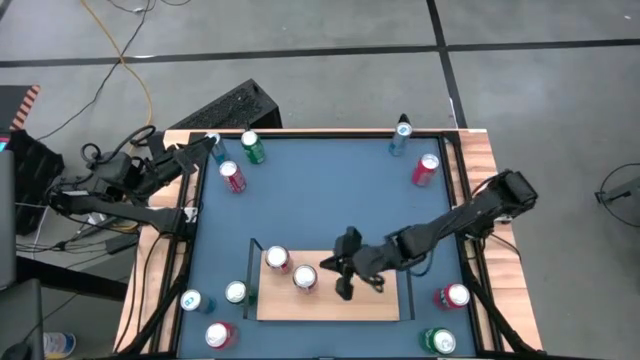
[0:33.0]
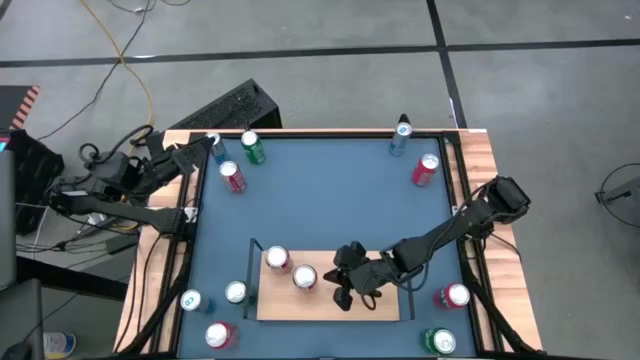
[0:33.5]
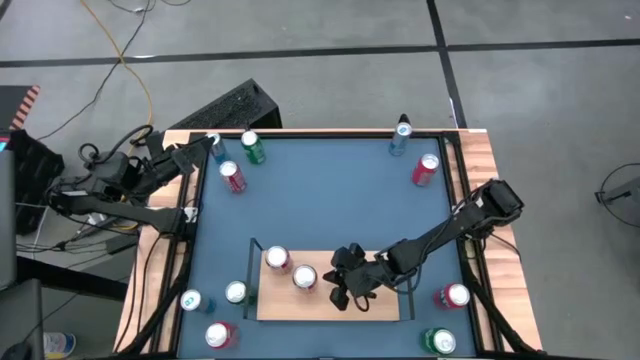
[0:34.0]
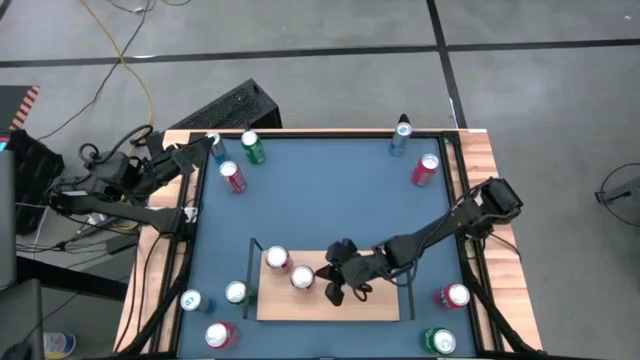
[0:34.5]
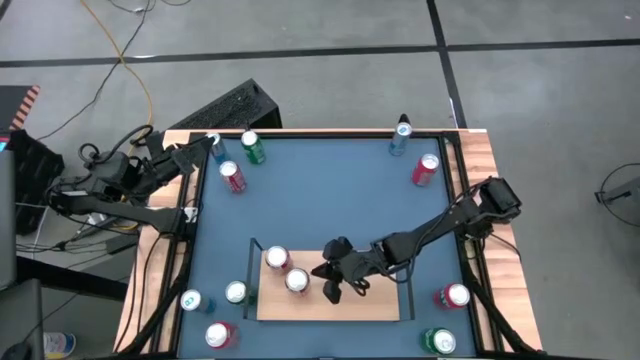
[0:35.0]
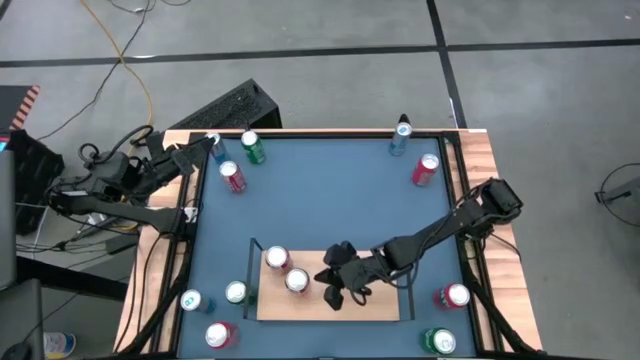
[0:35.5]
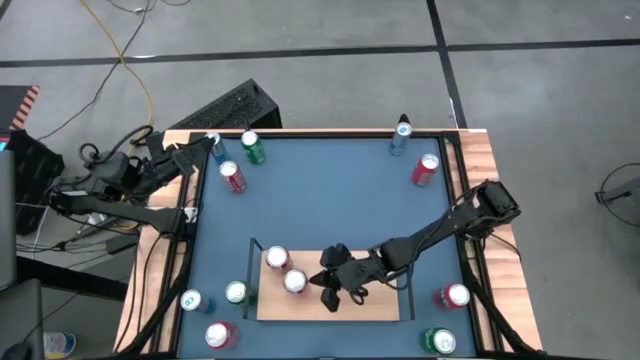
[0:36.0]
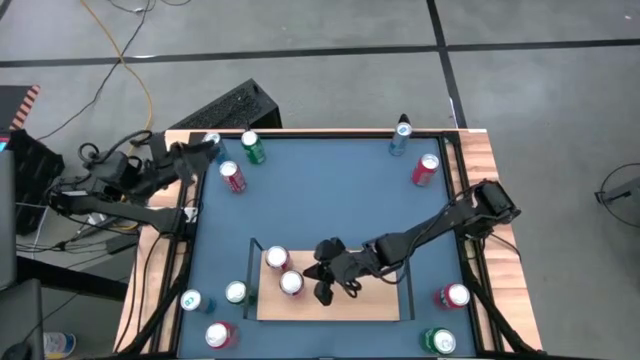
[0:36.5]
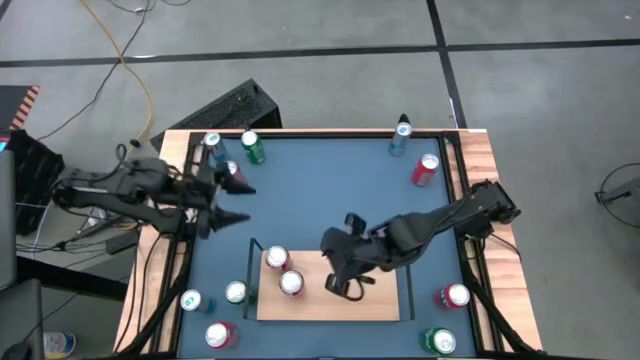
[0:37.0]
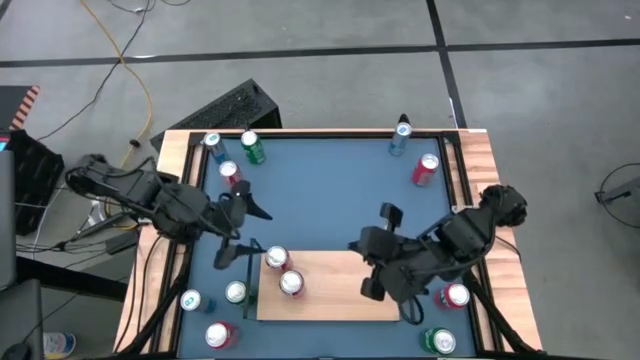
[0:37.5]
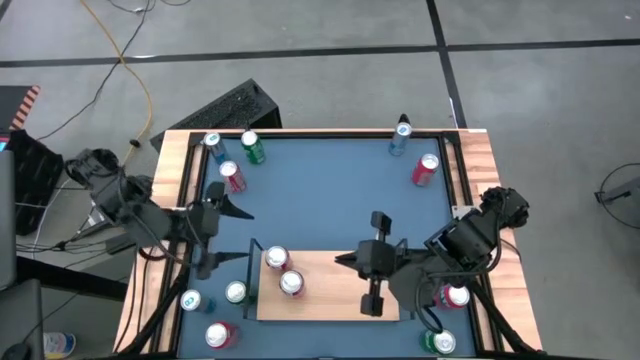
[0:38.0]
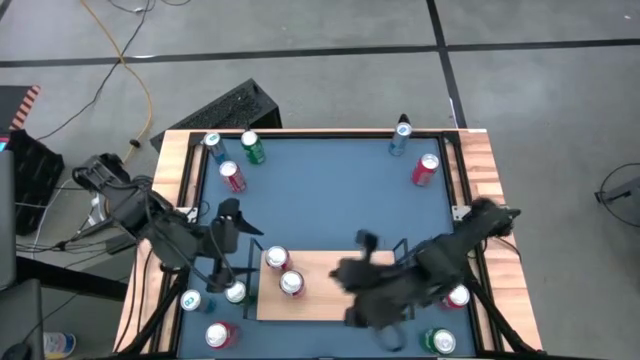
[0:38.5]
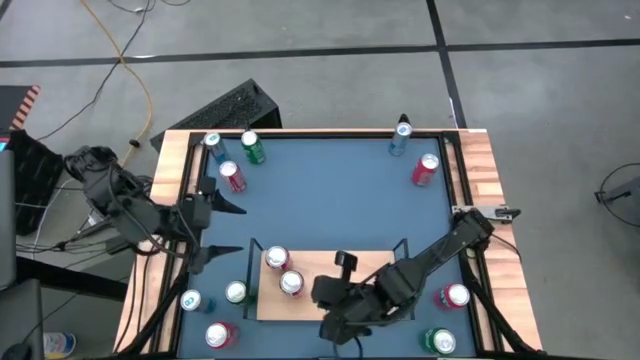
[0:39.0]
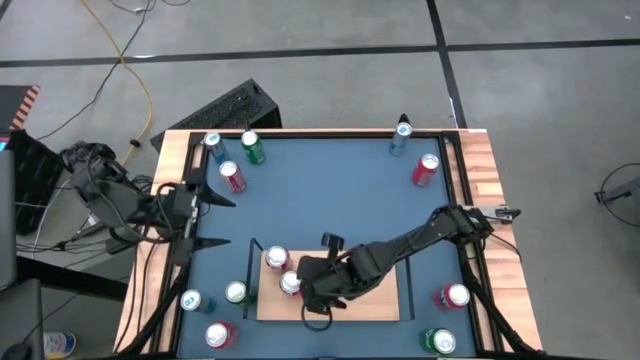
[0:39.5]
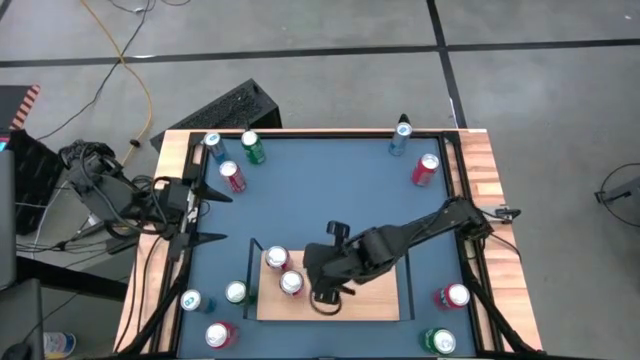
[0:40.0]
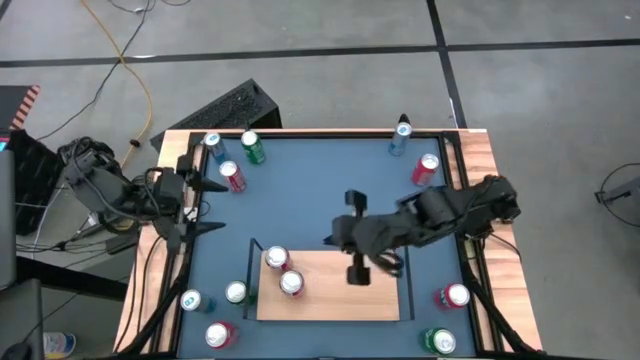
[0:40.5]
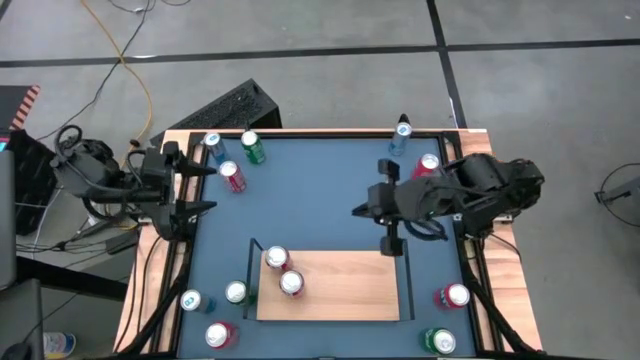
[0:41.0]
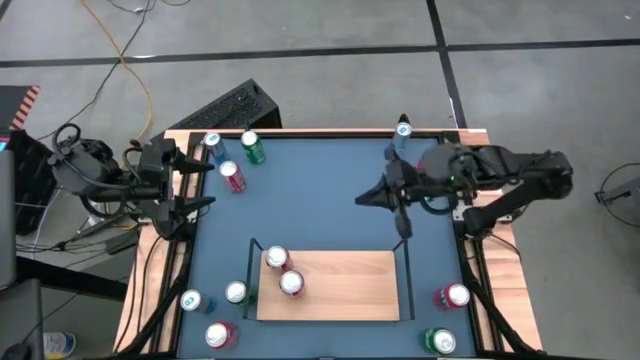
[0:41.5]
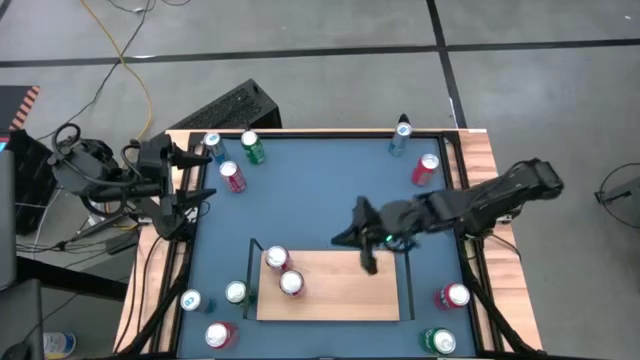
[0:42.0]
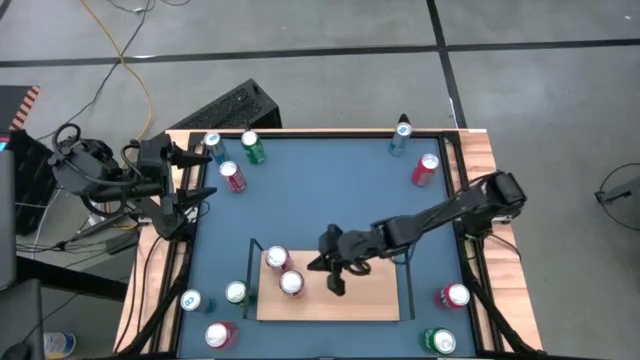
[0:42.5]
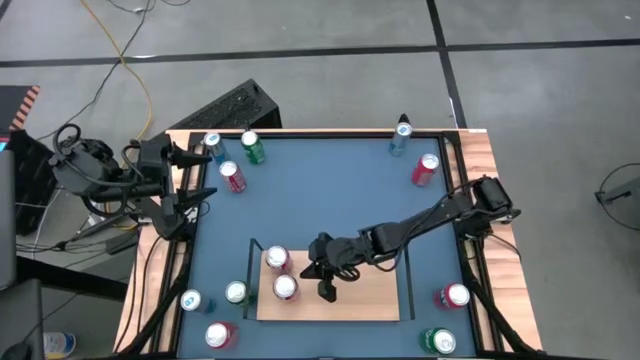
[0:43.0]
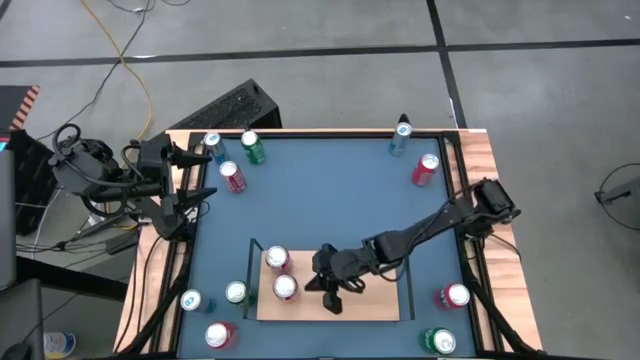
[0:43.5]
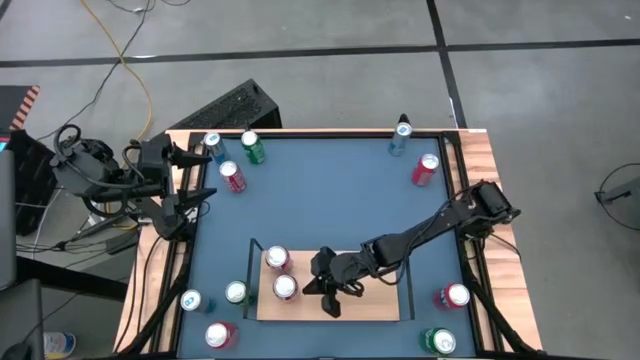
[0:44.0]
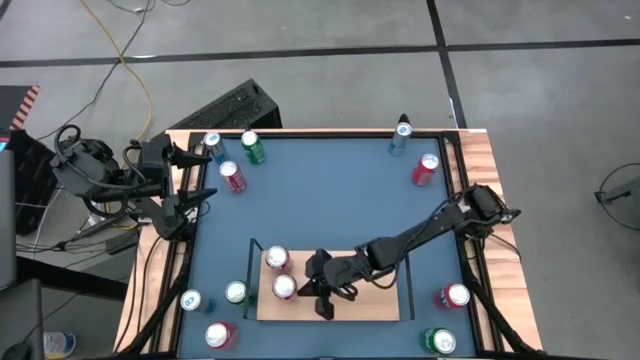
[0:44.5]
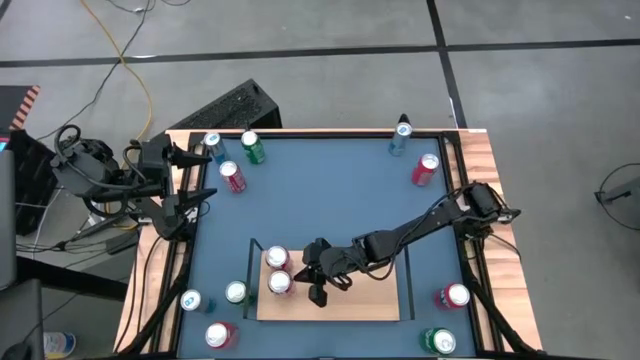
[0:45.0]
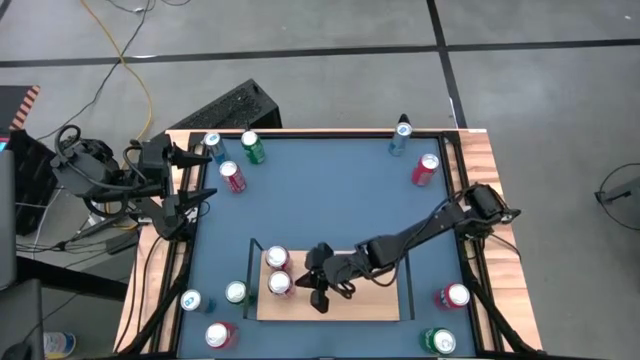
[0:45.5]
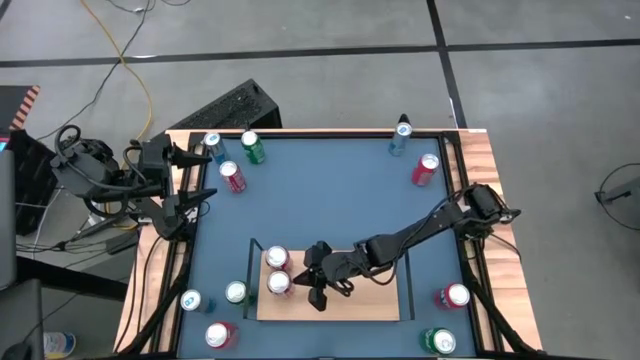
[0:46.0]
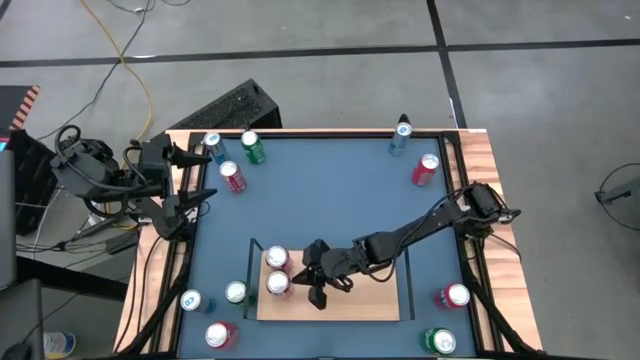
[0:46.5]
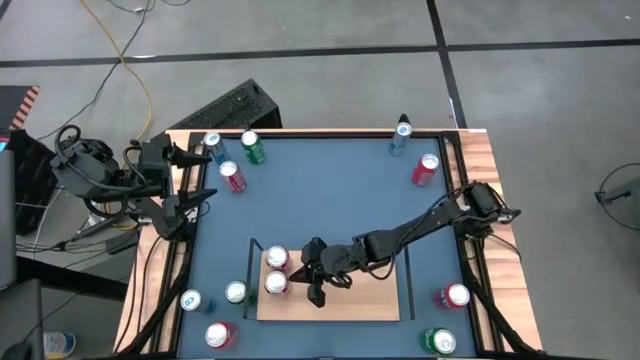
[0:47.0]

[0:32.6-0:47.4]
Task: Place canned beverage on shelf
Put the right red soda can on the shelf aligned with the other red soda can

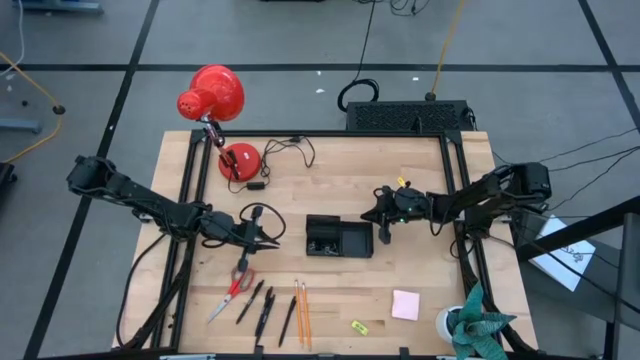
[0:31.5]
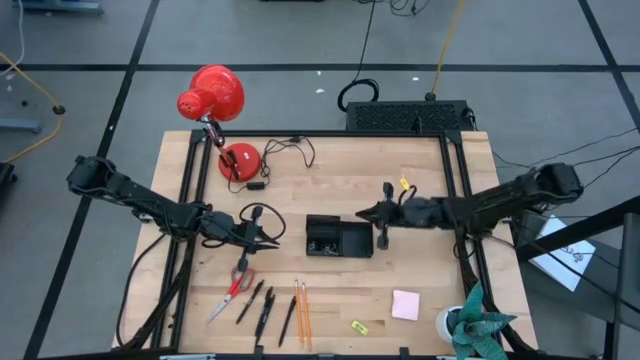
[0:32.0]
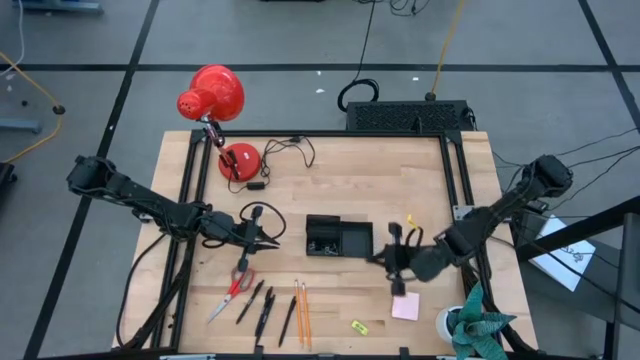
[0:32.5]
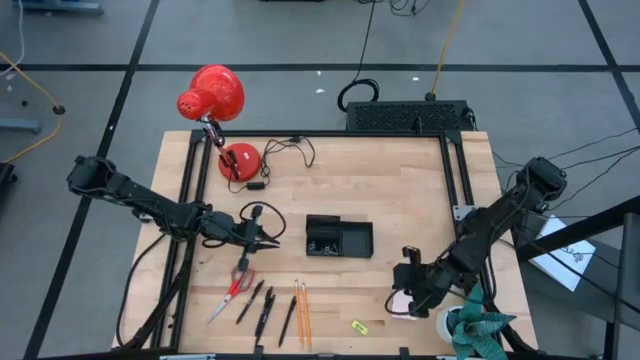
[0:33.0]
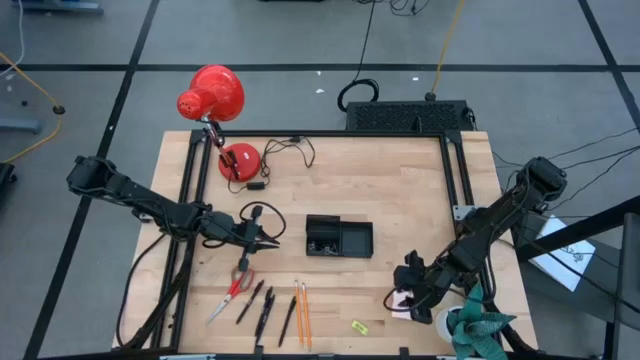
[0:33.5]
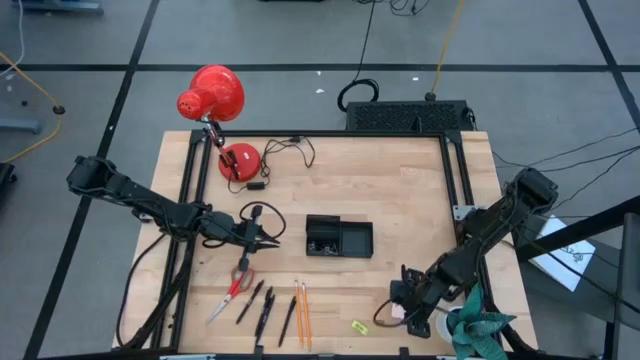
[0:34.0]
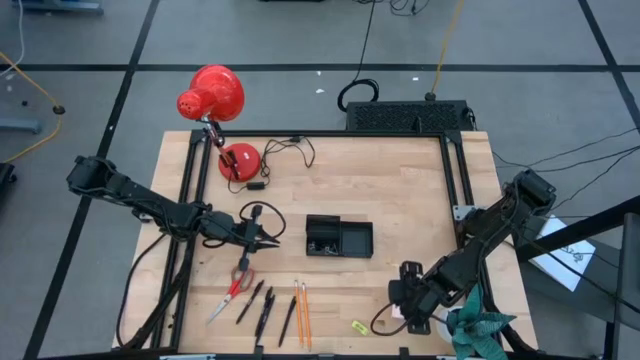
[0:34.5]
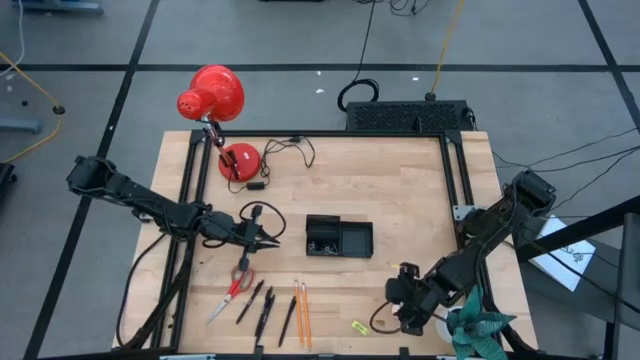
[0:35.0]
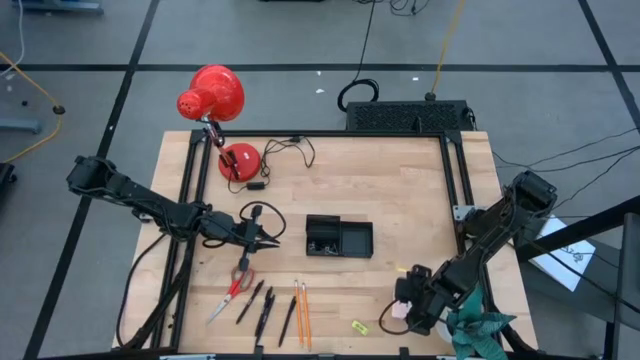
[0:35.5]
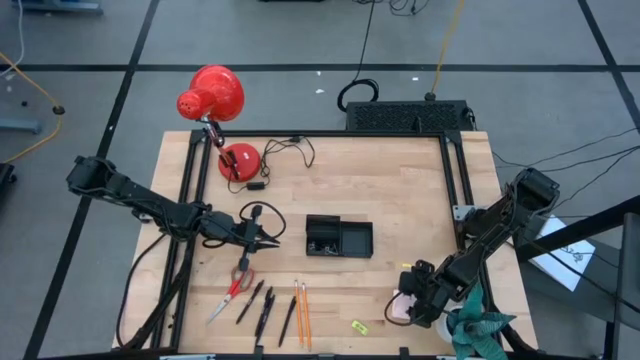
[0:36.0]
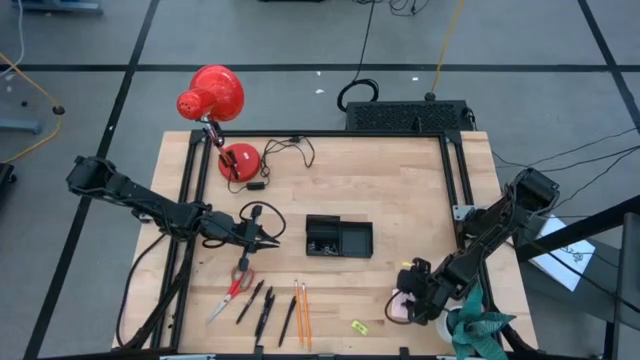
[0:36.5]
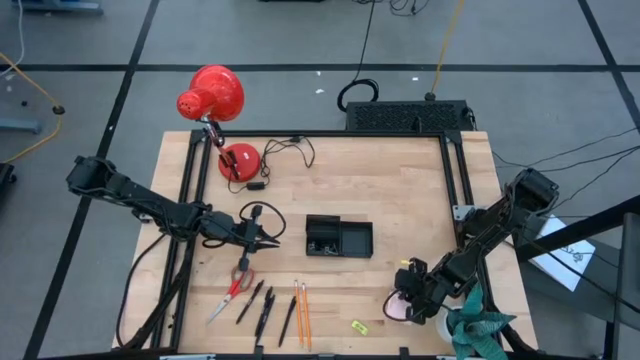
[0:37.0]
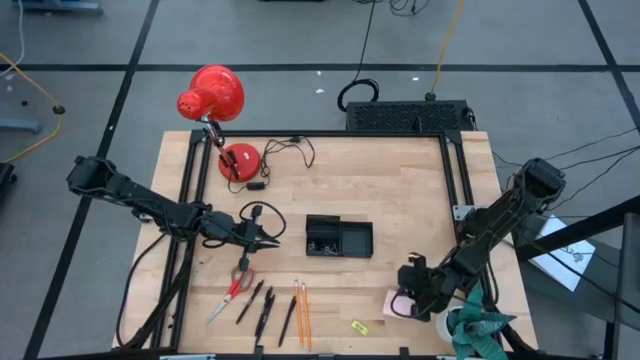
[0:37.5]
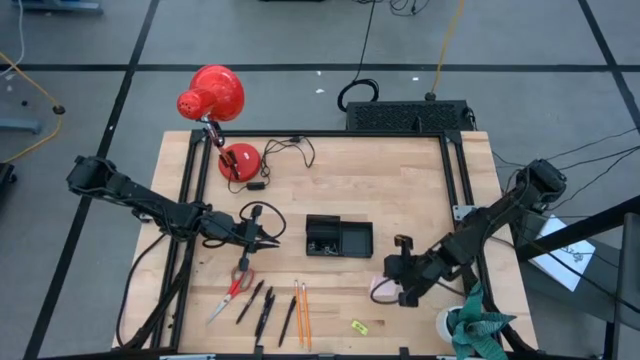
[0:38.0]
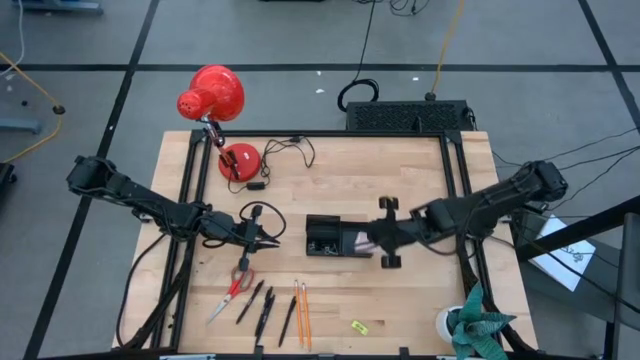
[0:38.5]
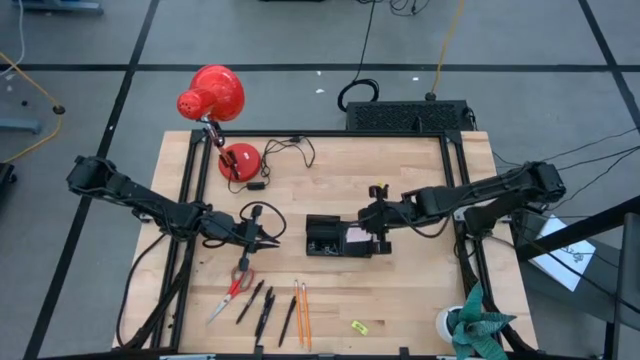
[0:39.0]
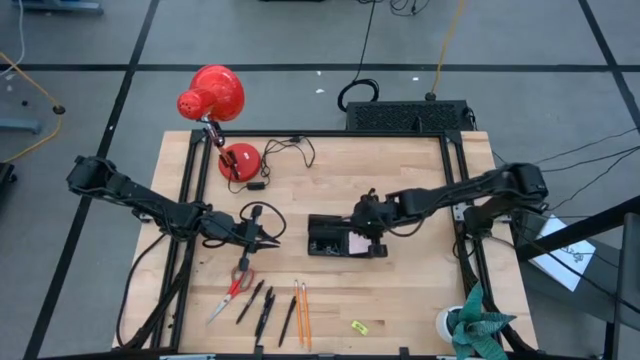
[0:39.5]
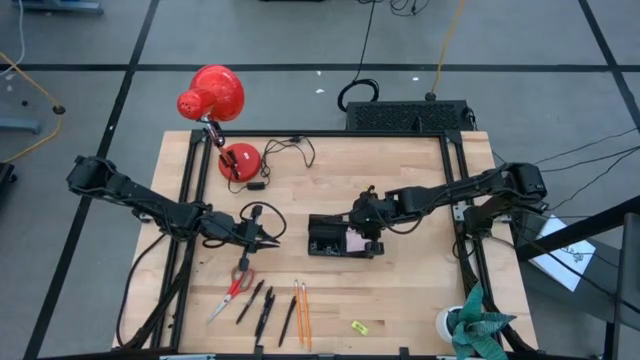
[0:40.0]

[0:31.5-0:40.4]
Task: Pick and place office supplies into organizer
Put the pink sticky notes into the black desk organizer
